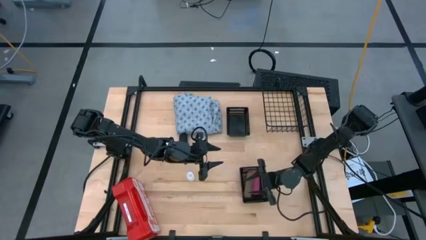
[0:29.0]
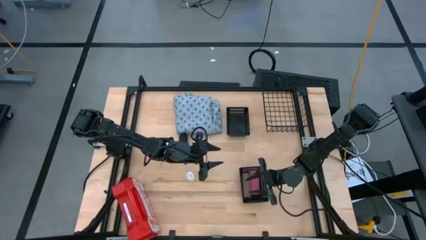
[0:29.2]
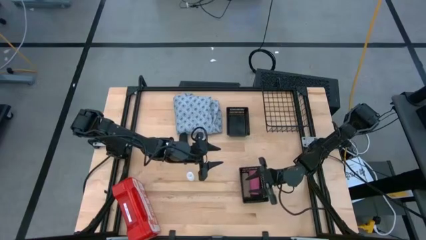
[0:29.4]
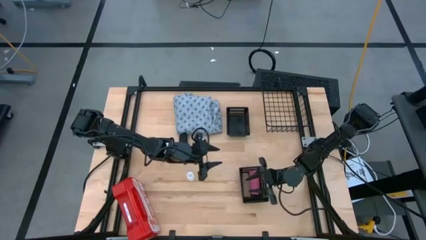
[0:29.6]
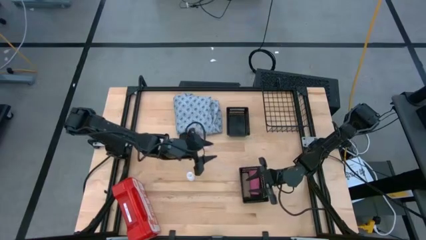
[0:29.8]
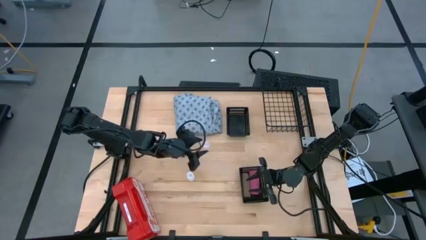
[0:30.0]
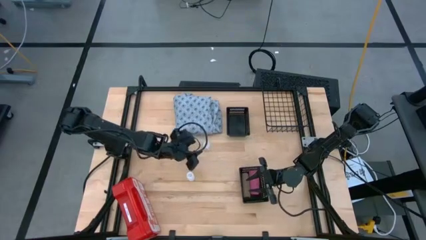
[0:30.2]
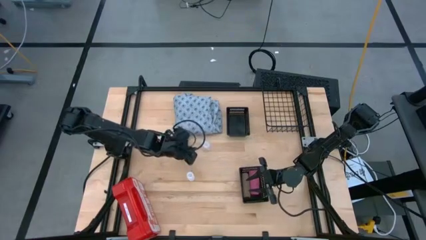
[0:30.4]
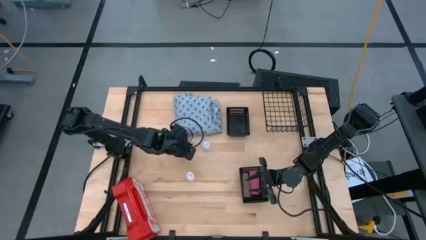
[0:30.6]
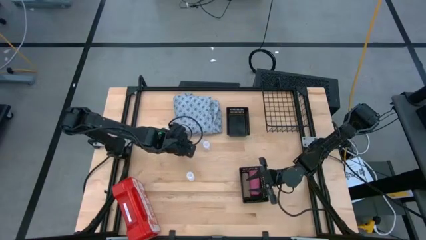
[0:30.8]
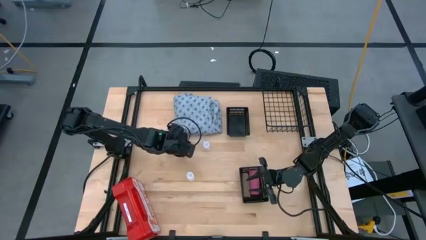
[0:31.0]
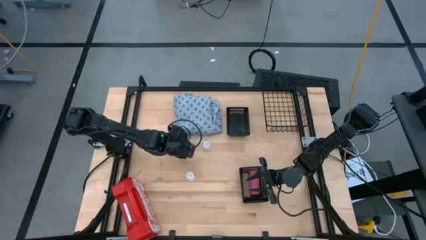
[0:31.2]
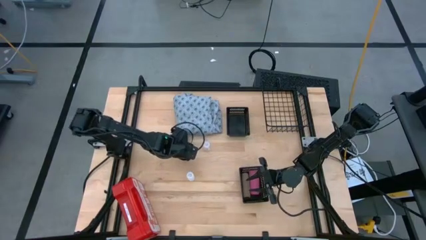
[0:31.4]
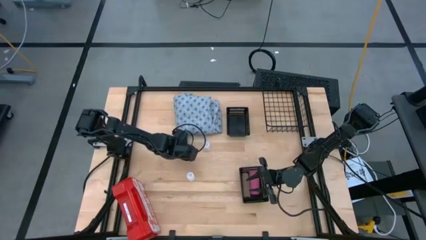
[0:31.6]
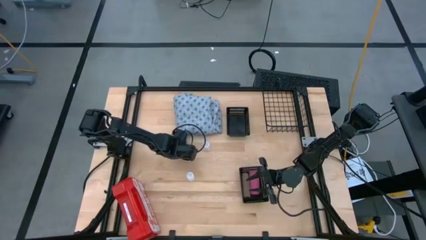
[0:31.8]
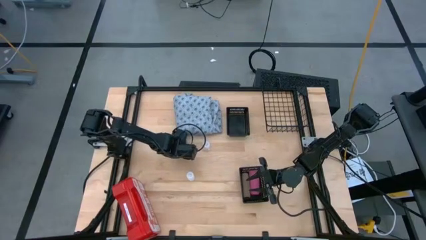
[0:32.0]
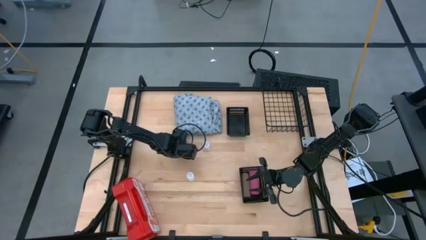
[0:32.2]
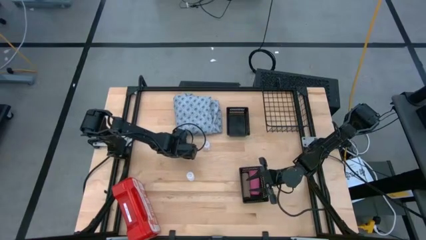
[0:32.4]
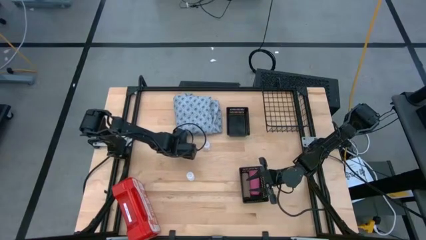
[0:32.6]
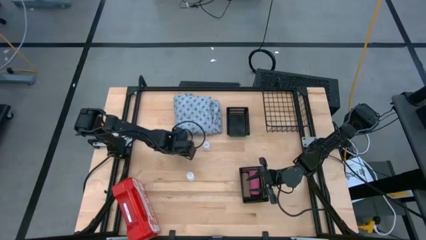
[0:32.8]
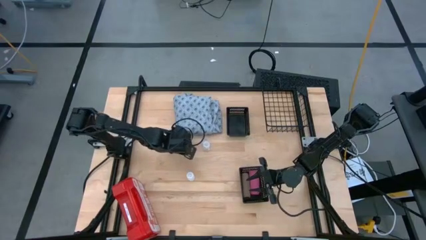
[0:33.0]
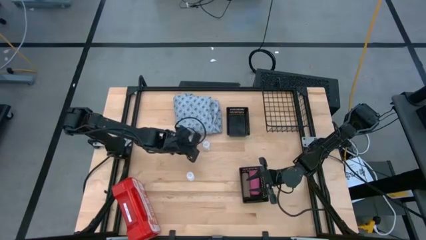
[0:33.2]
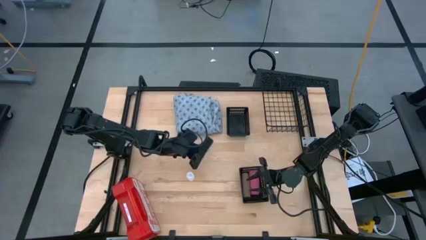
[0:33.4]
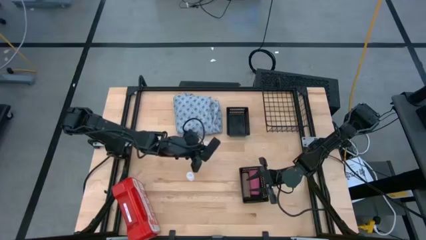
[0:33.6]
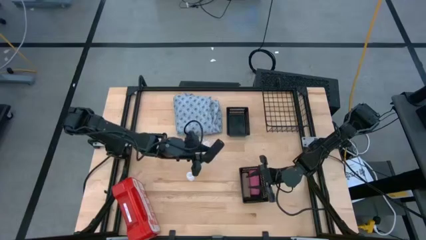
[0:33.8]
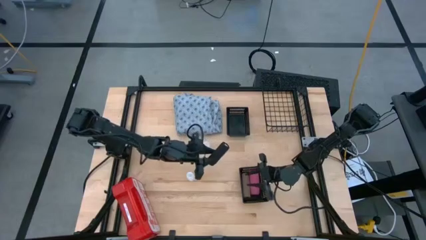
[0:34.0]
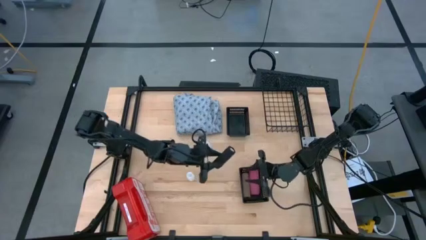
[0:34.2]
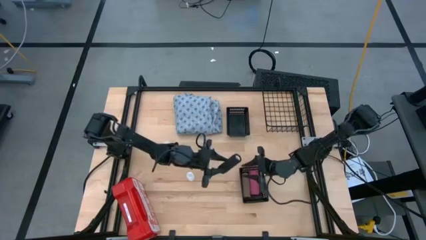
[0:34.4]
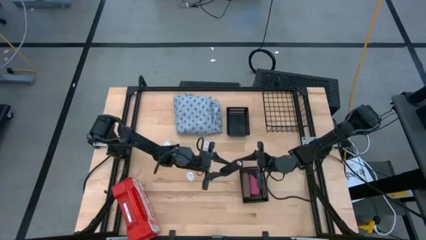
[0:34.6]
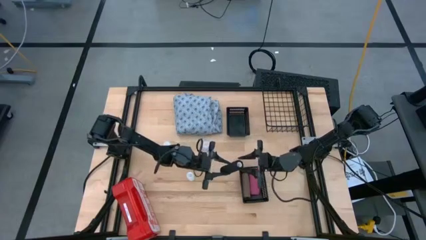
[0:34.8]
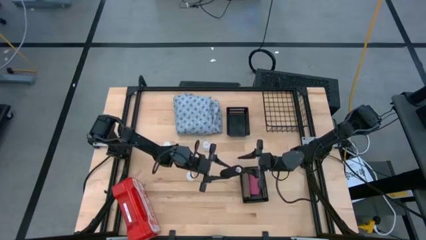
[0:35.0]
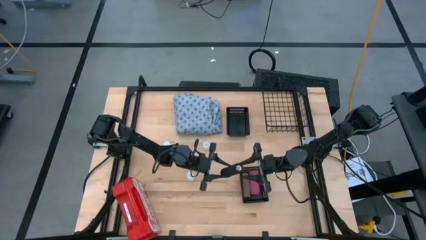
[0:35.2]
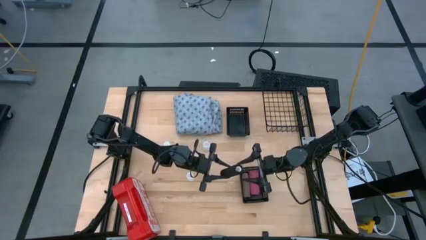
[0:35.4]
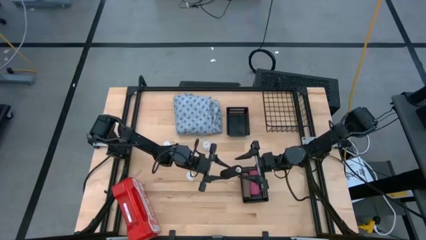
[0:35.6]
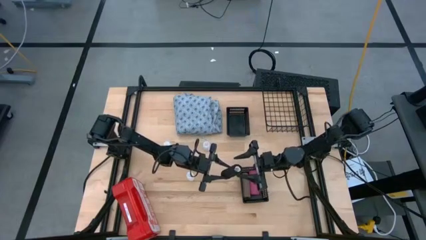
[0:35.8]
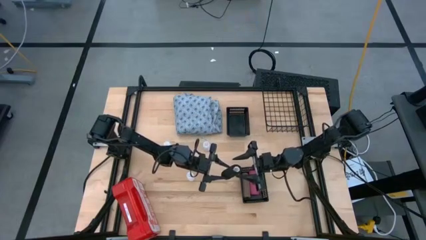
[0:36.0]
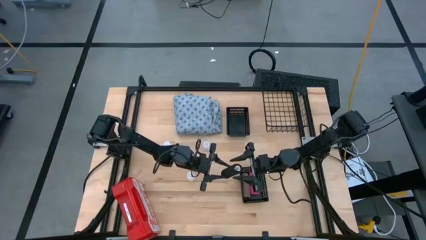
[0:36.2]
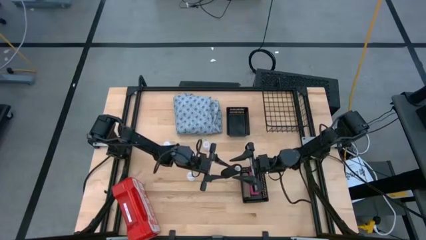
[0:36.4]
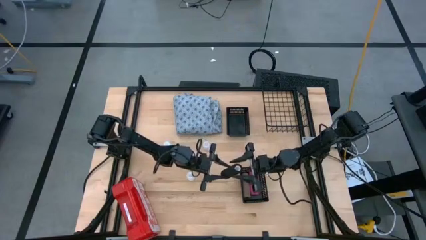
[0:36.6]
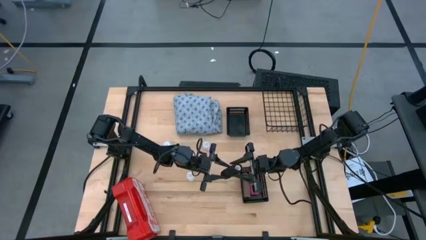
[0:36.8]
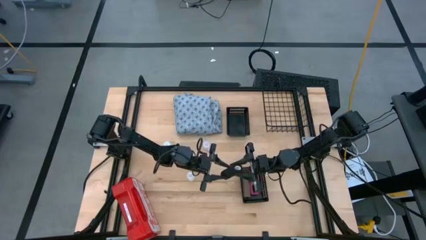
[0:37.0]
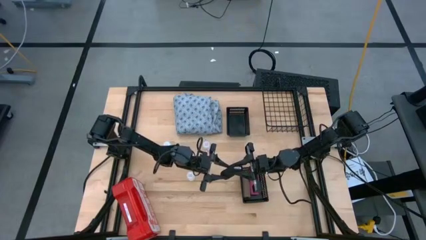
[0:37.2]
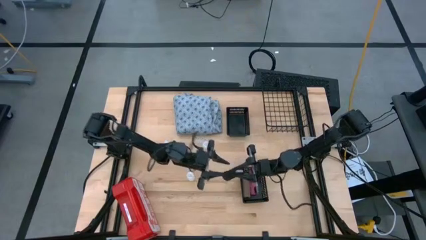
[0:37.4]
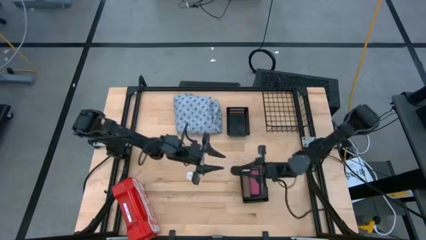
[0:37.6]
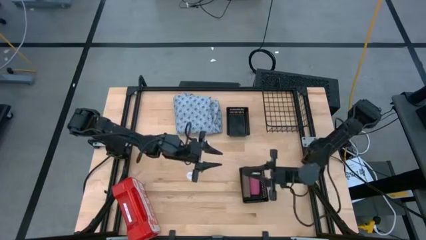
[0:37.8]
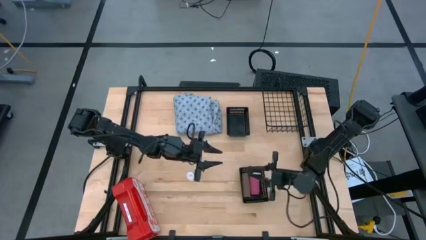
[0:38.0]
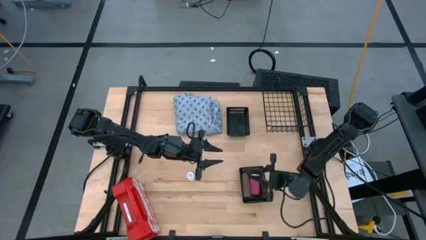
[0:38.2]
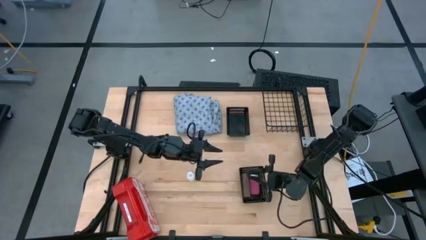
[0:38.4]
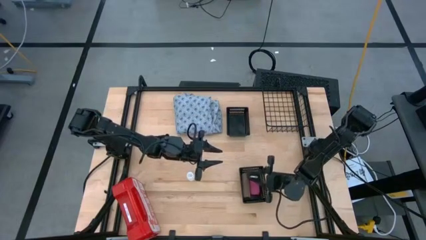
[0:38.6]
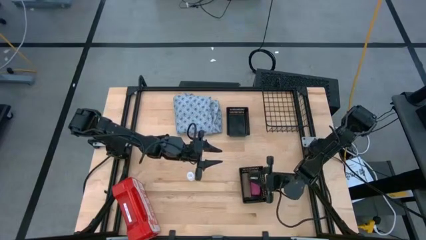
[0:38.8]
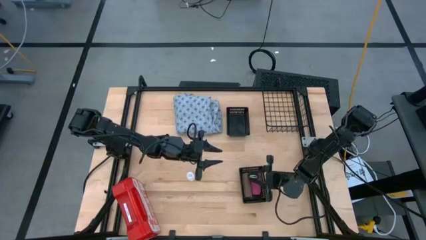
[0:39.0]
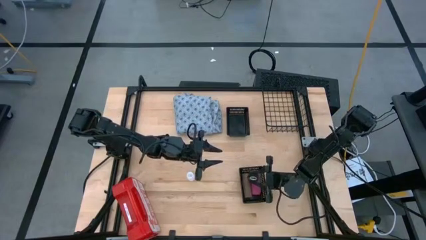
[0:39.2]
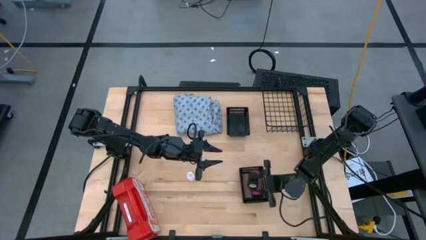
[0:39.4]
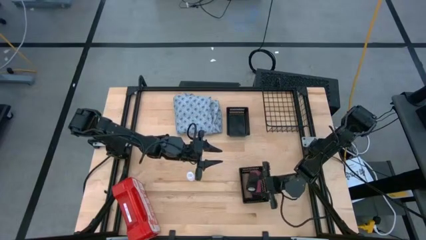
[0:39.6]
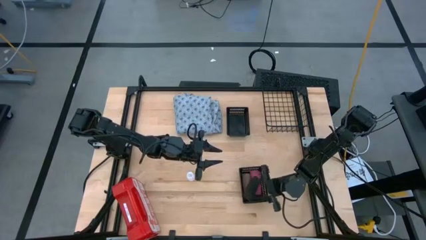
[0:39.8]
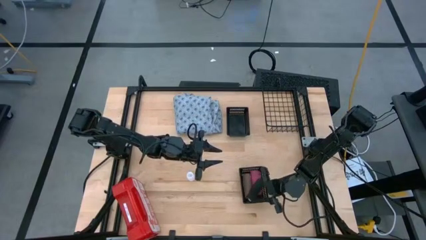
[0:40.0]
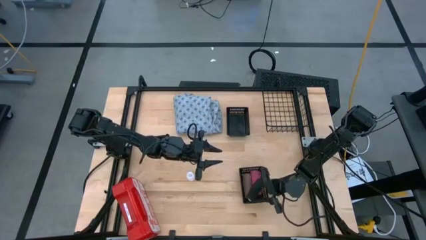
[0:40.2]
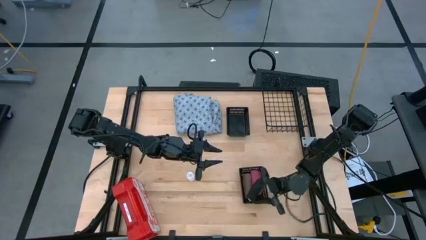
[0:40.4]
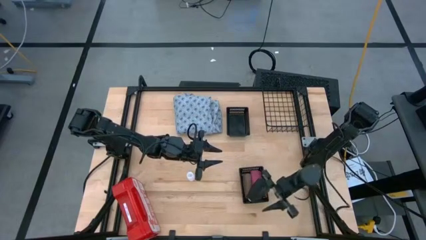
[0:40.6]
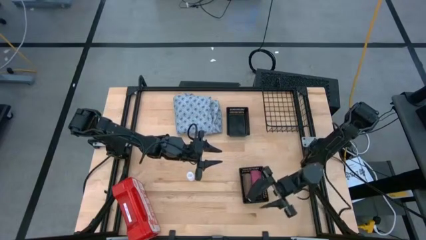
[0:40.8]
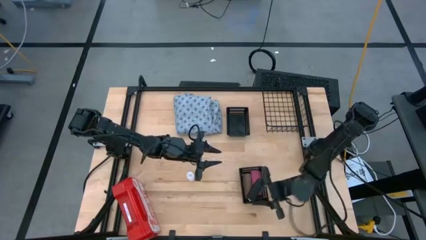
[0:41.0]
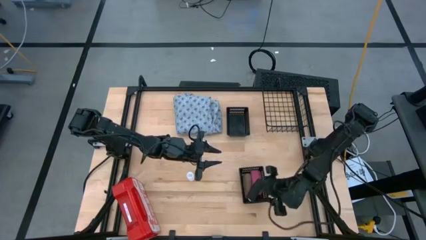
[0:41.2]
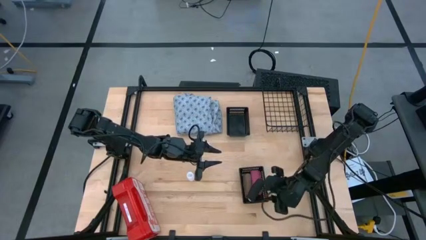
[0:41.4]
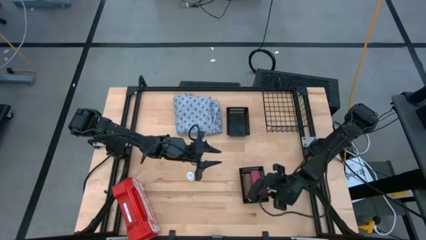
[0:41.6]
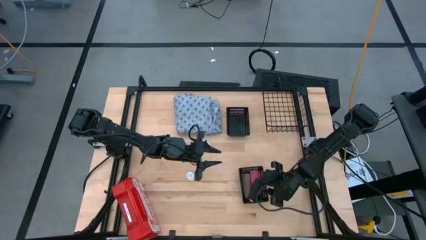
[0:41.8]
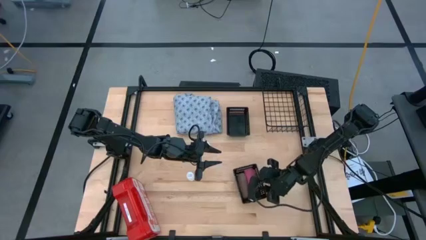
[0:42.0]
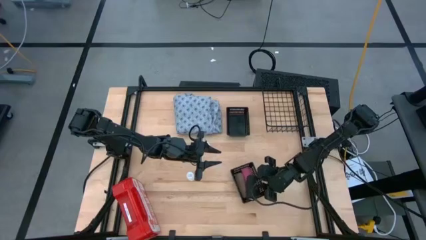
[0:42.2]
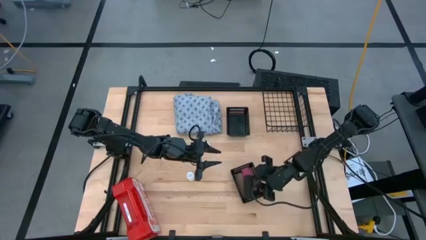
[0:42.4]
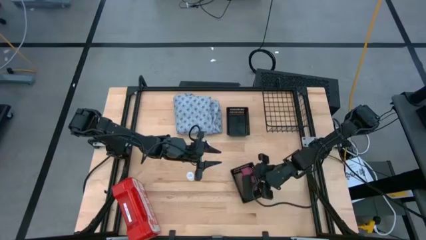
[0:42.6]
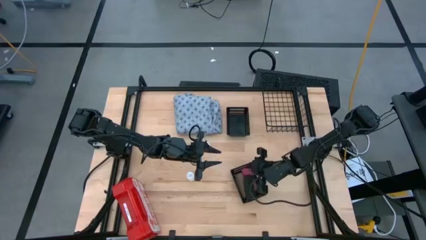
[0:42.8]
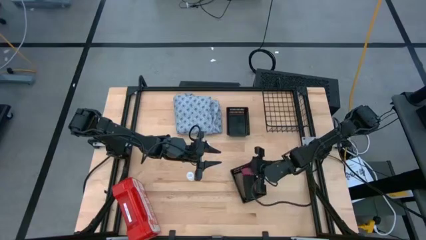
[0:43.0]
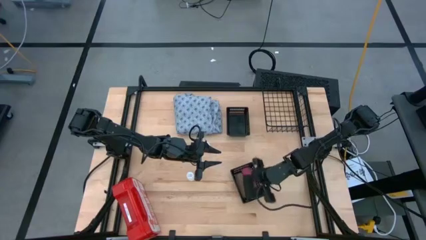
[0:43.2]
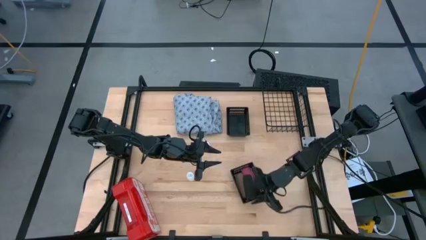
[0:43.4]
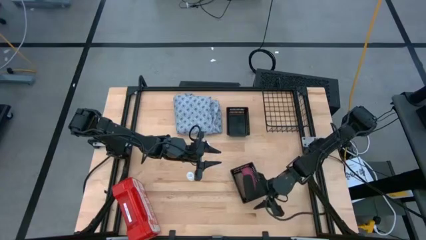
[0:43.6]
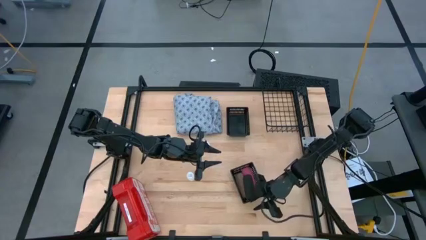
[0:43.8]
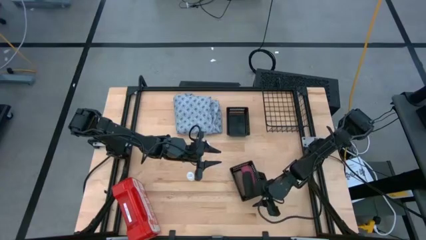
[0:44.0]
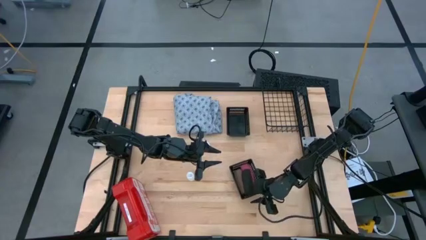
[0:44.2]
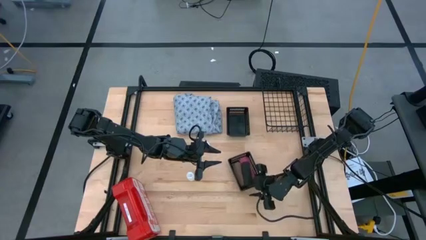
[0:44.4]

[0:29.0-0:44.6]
Task: Pick & Place Medicine items
Put the black bandage into the bottom black basket
